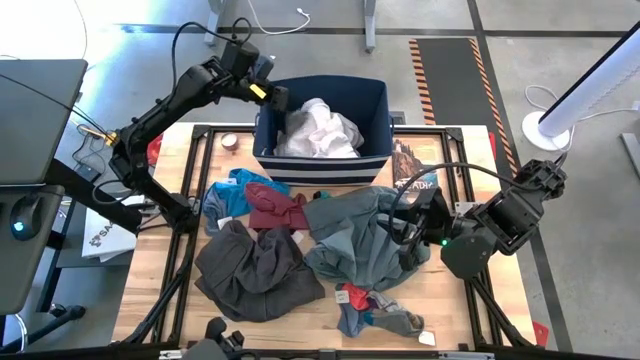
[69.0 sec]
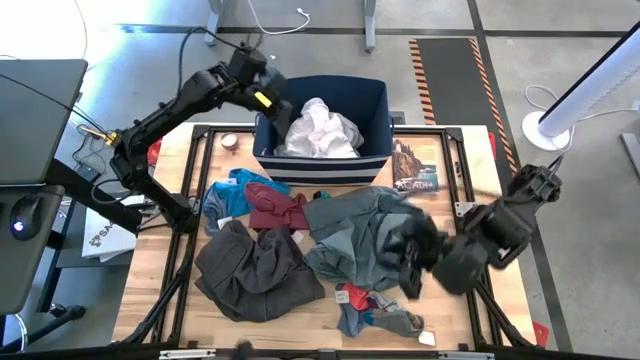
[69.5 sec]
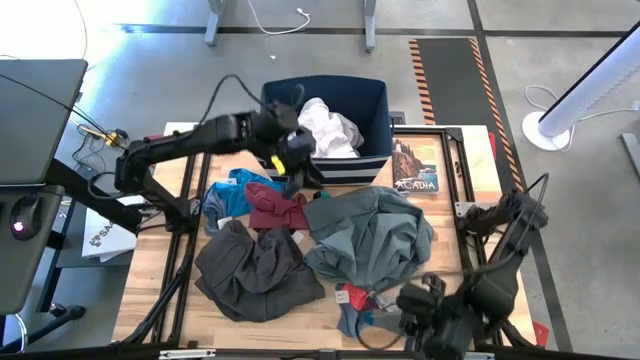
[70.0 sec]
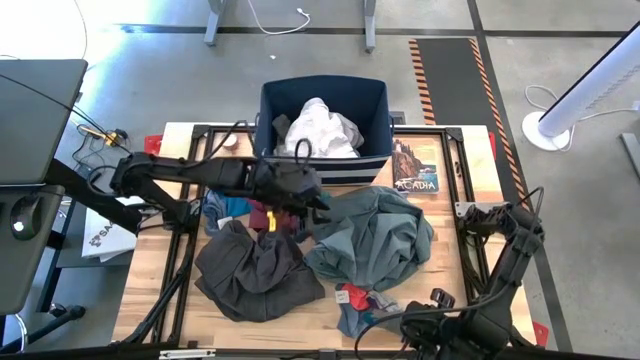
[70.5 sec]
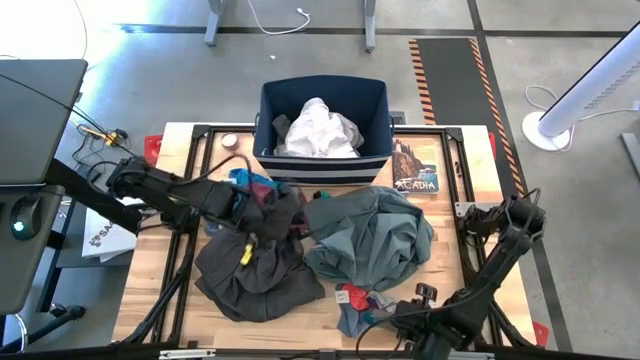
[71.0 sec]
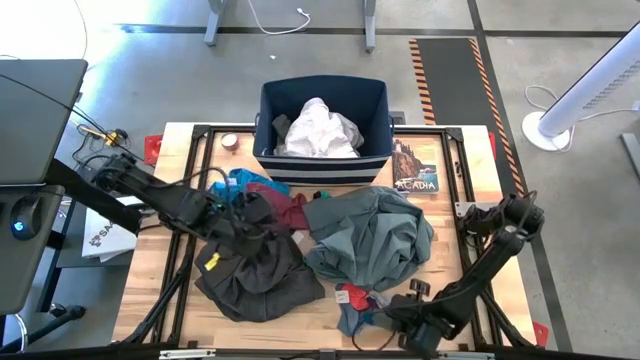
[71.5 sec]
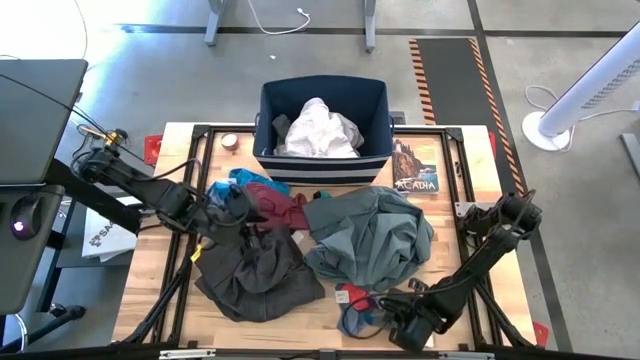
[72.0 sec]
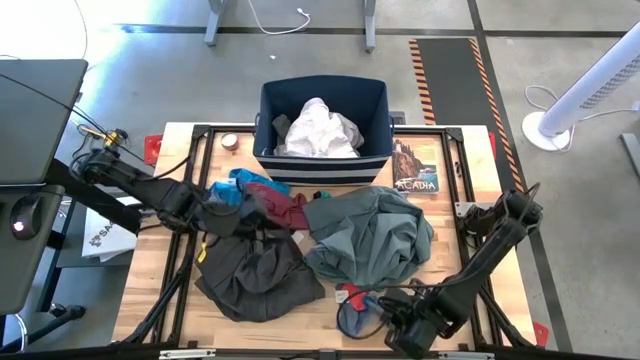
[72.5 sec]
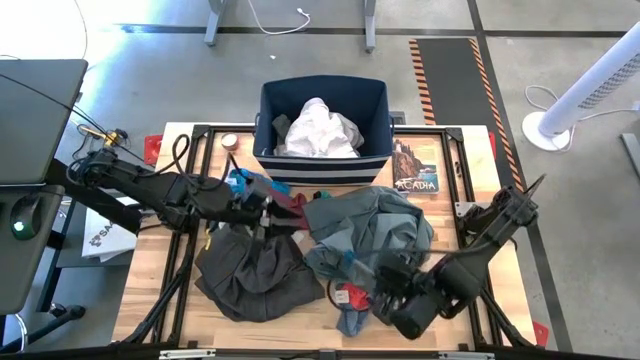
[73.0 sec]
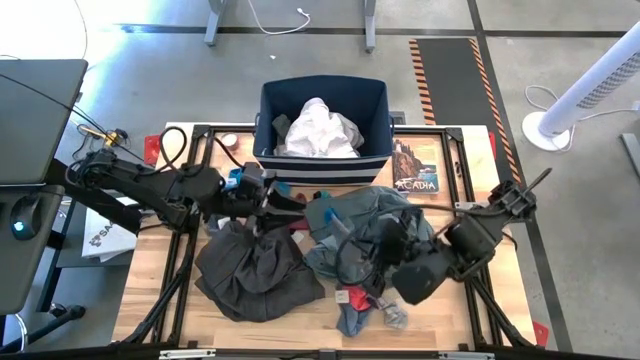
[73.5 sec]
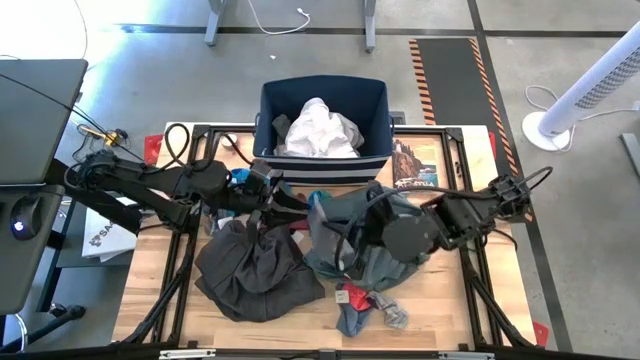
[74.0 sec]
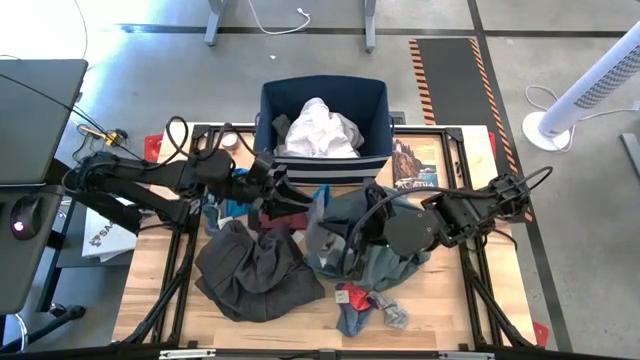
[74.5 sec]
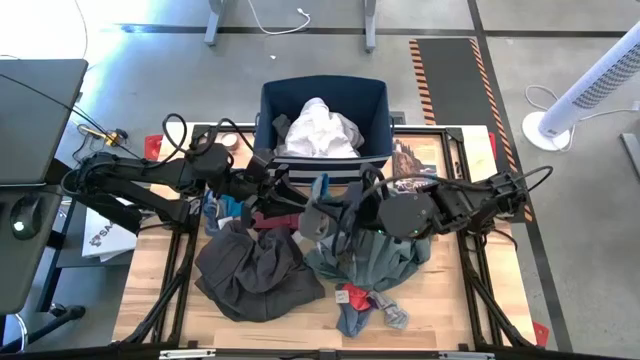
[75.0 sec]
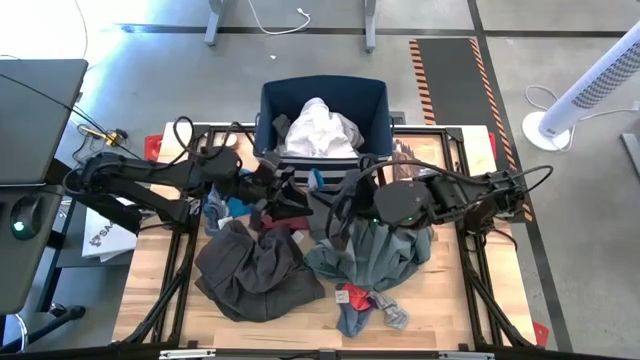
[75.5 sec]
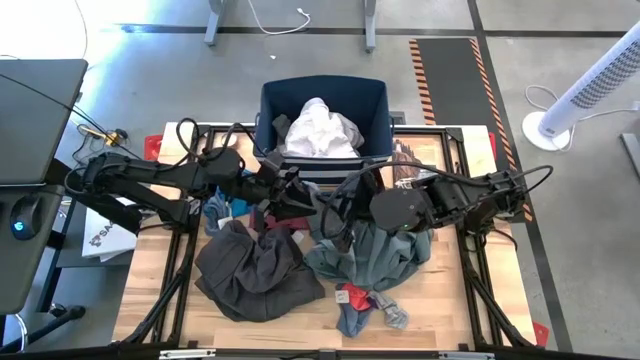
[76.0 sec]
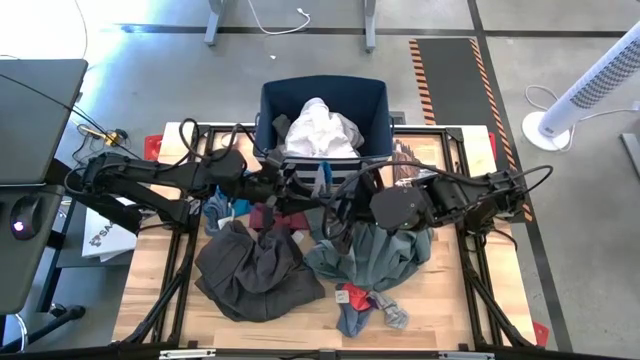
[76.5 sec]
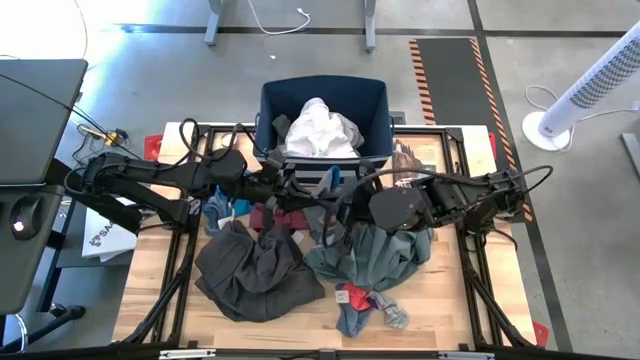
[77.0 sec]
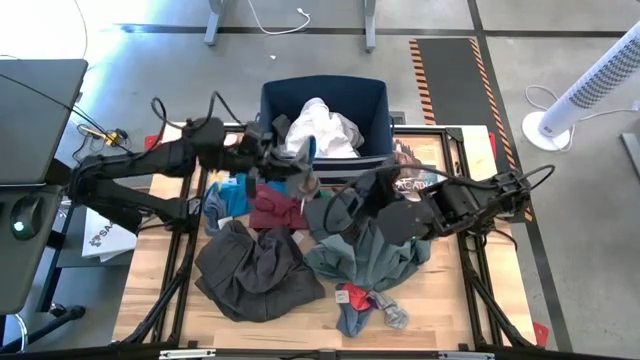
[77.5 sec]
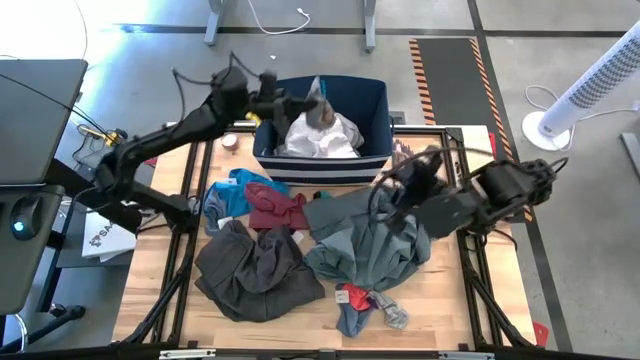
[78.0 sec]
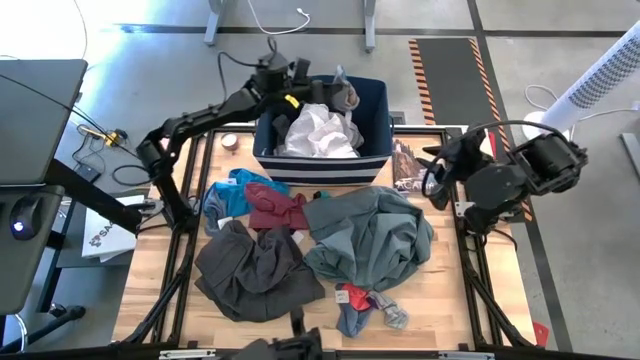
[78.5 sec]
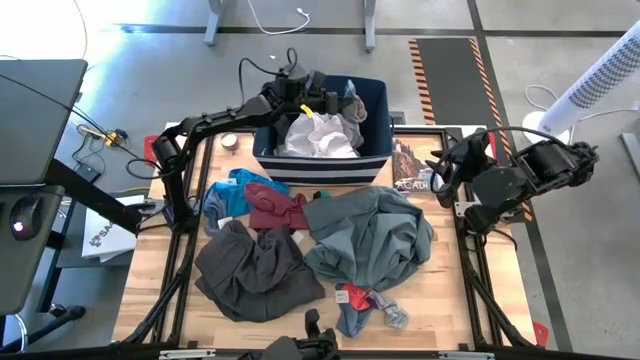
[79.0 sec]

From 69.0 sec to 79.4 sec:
Task: Sort clothes
Put the grey sock into the blue laundry bin

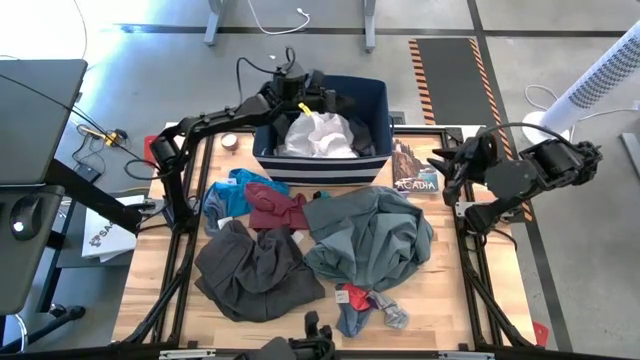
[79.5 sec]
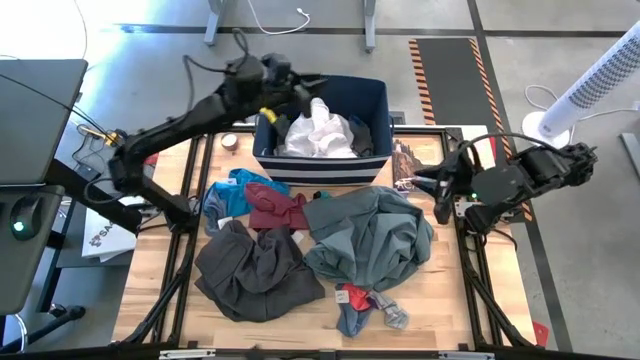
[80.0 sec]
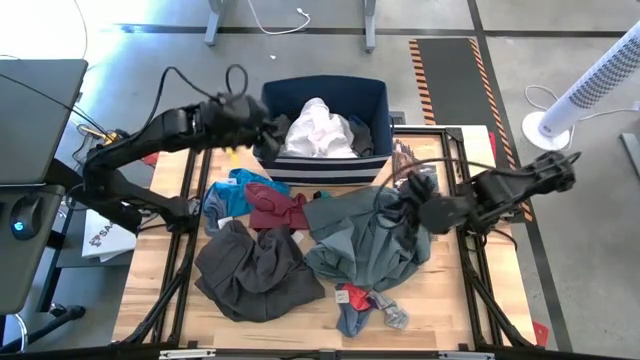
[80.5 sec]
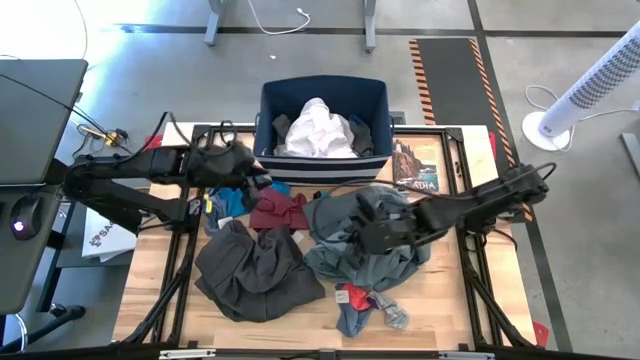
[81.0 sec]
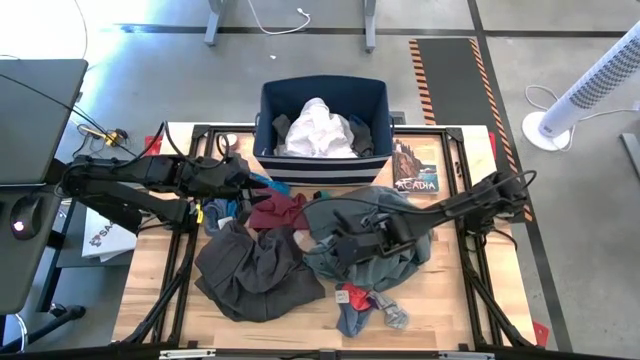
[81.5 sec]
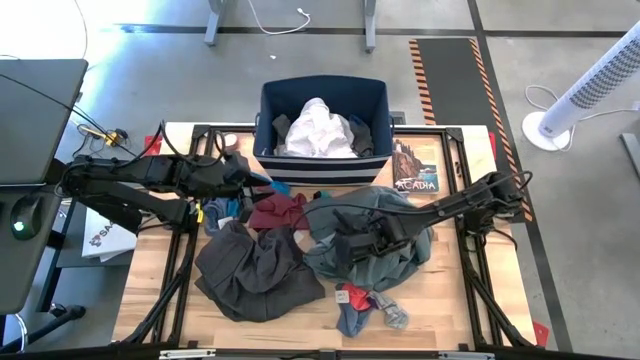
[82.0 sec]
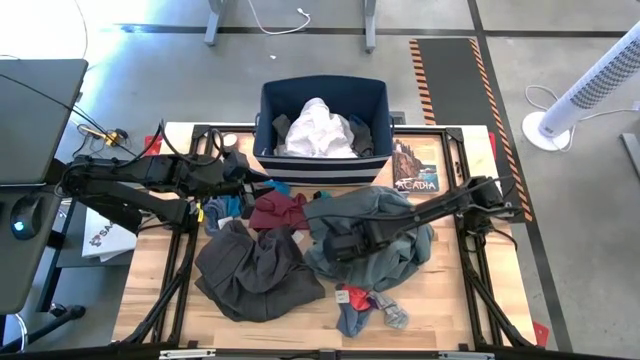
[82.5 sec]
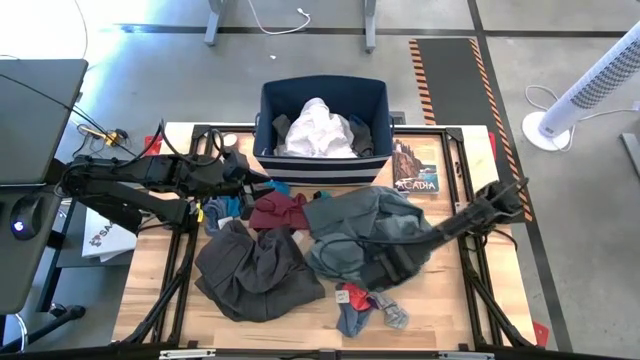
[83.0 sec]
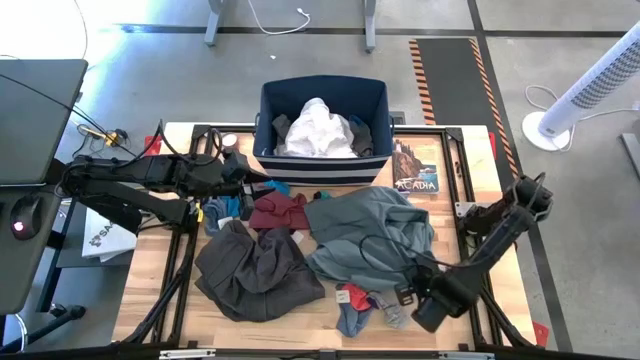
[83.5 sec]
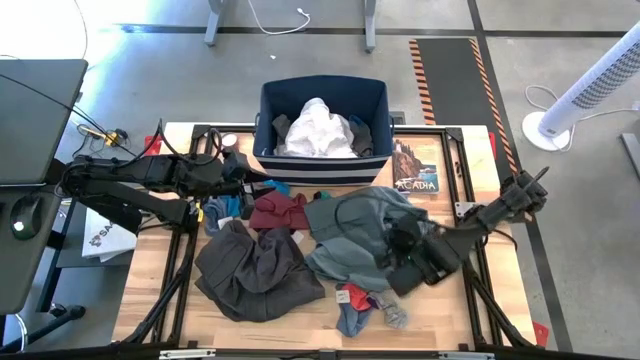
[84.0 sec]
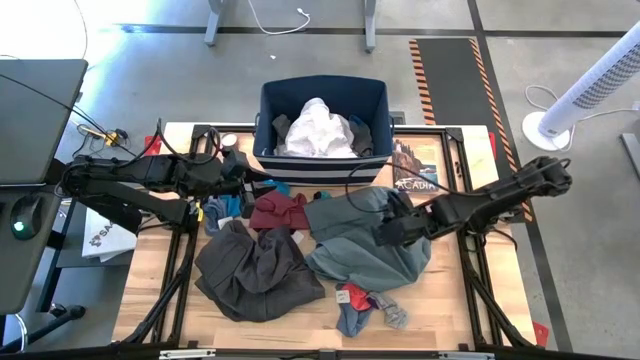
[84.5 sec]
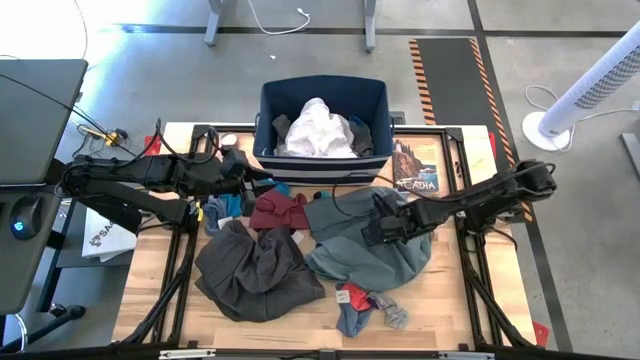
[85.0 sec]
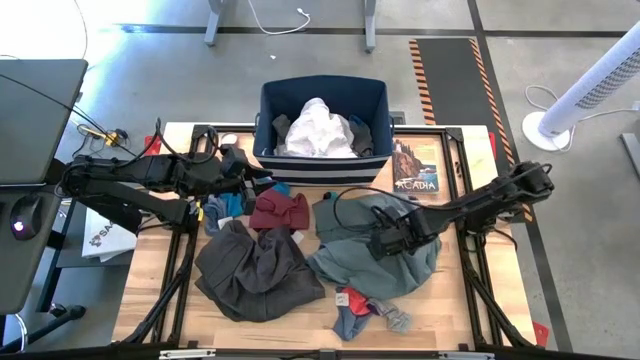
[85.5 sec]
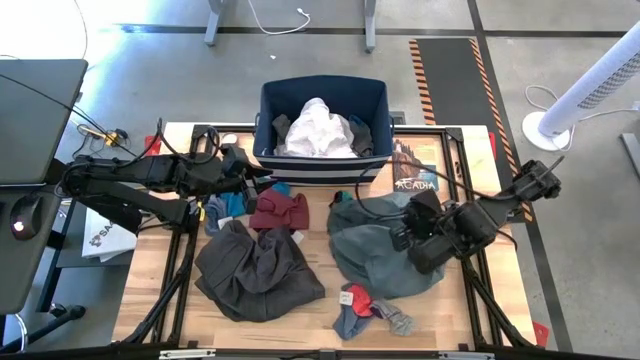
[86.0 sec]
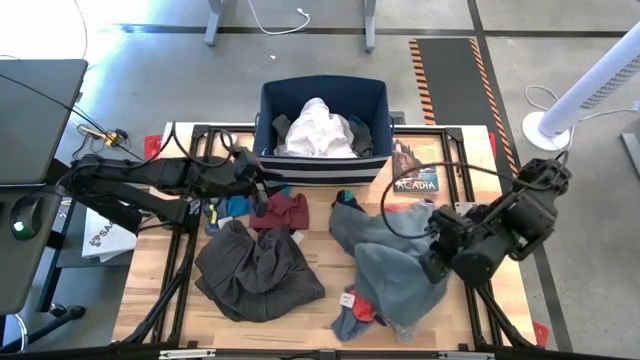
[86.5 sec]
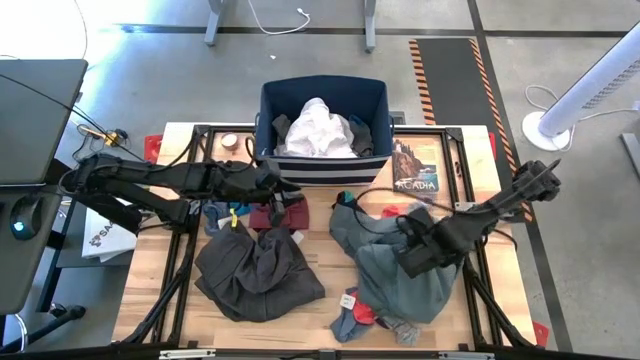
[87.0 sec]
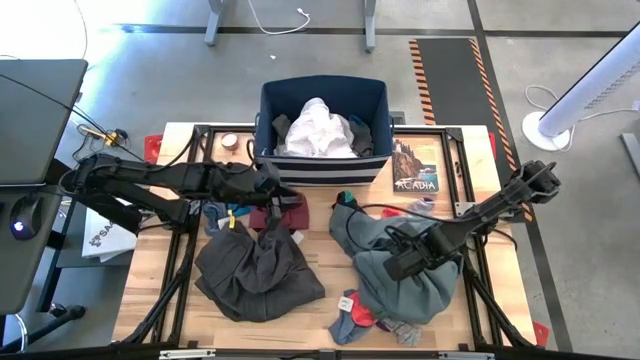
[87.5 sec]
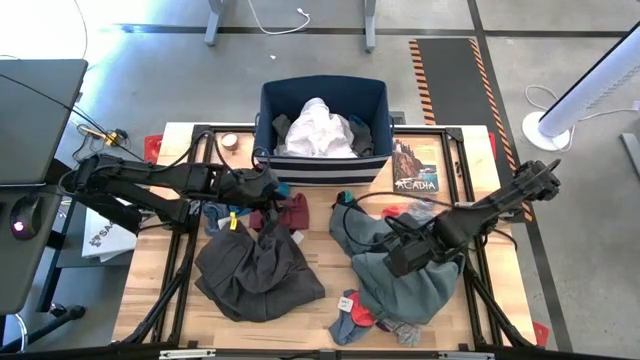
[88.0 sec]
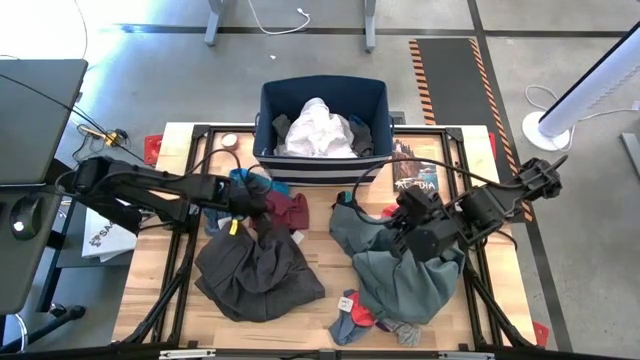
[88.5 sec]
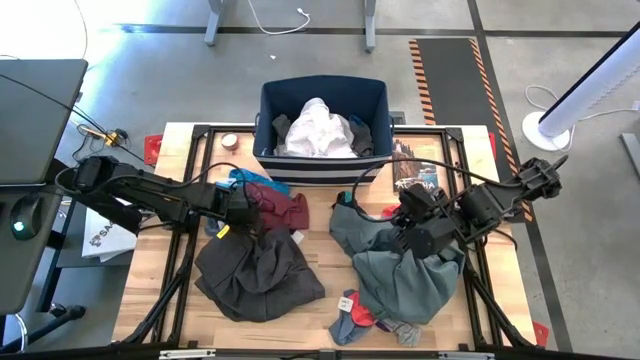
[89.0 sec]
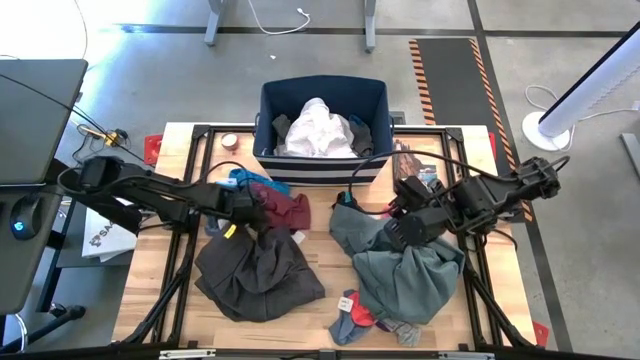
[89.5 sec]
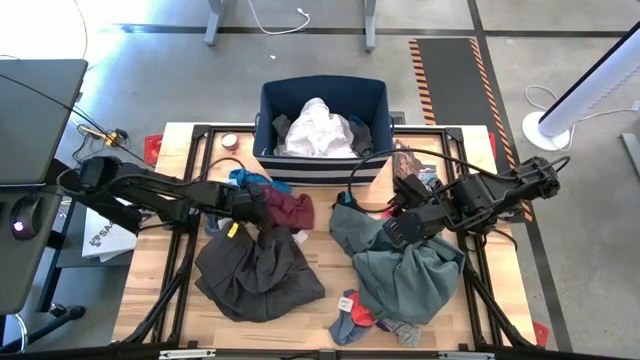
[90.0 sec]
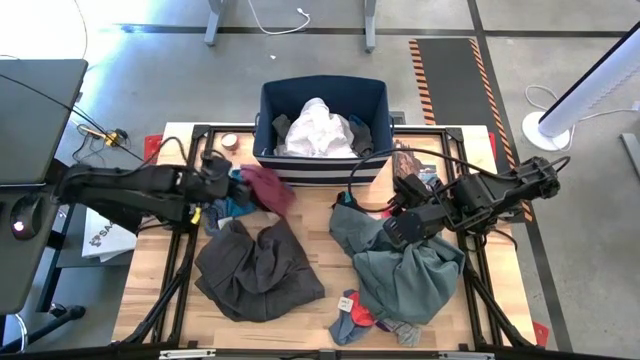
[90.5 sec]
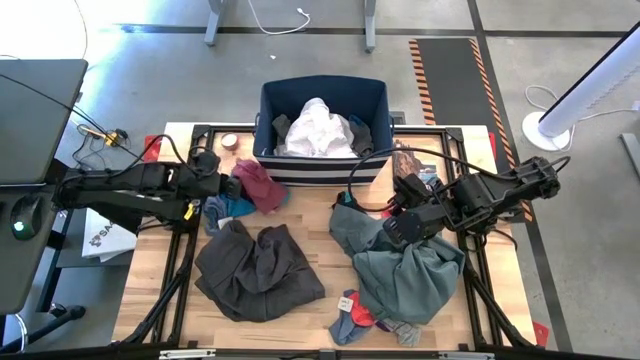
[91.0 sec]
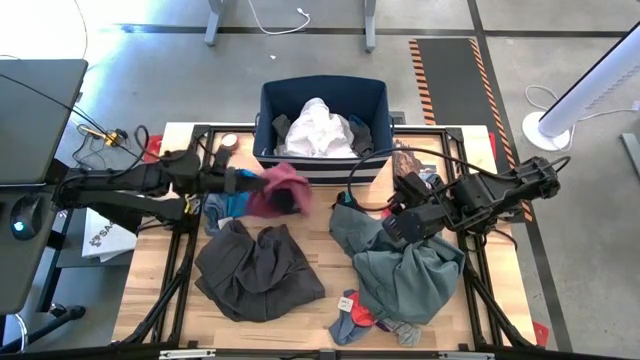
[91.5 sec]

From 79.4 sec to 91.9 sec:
Put the black sock into the blue laundry bin
